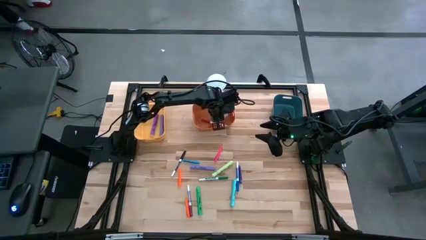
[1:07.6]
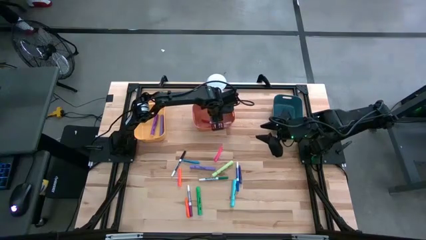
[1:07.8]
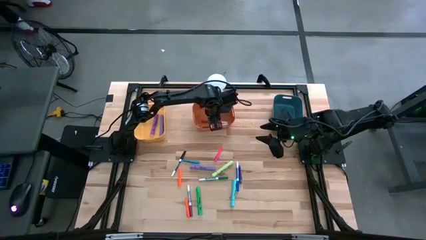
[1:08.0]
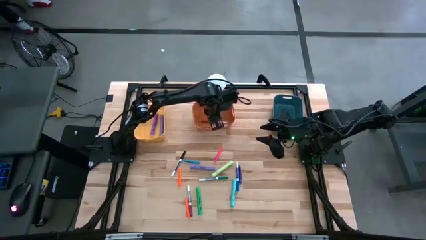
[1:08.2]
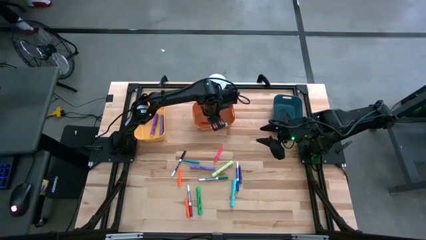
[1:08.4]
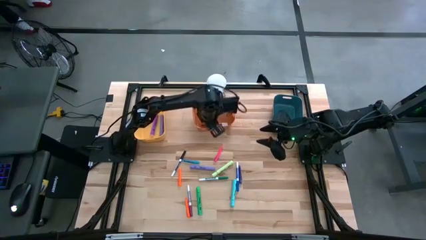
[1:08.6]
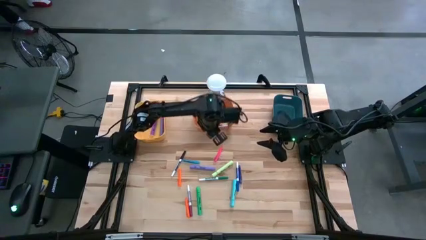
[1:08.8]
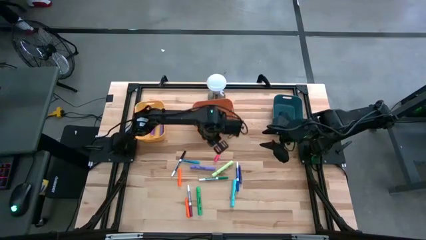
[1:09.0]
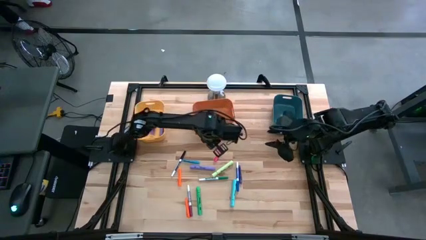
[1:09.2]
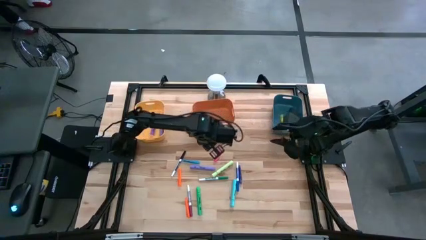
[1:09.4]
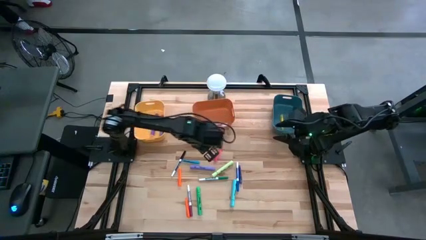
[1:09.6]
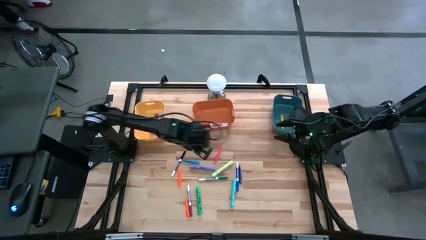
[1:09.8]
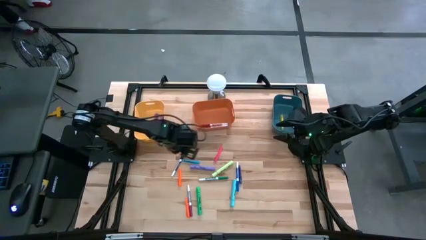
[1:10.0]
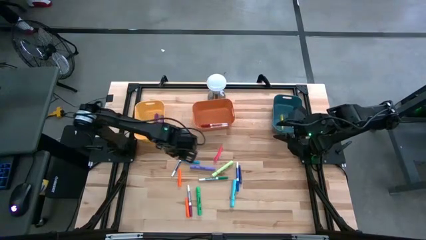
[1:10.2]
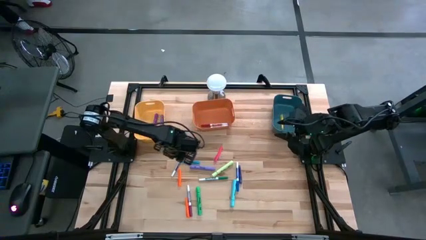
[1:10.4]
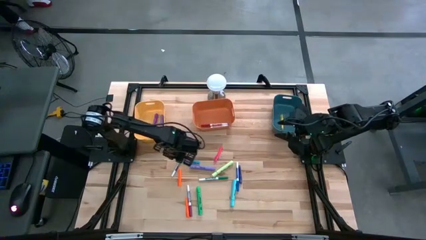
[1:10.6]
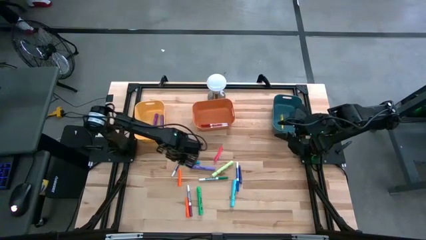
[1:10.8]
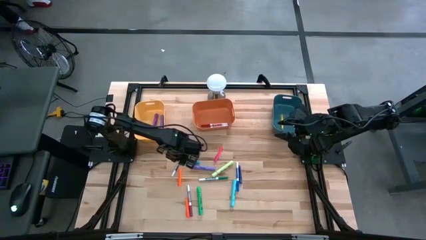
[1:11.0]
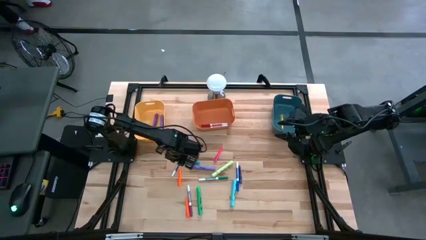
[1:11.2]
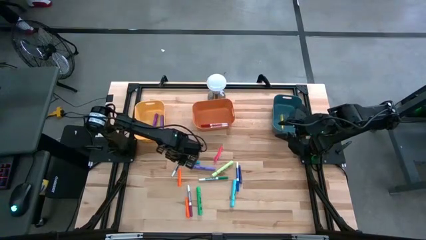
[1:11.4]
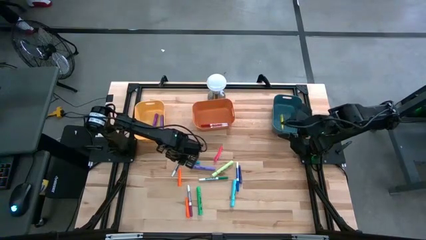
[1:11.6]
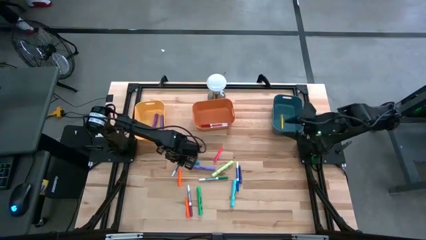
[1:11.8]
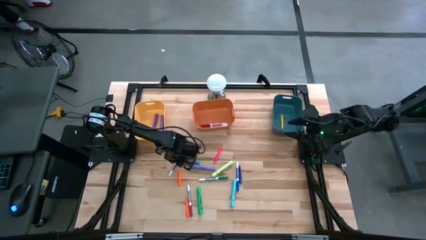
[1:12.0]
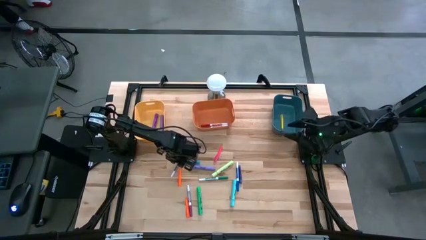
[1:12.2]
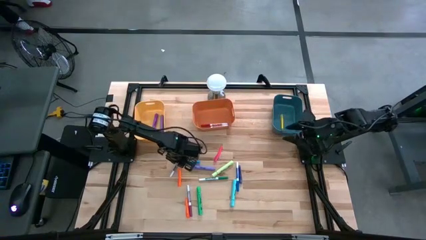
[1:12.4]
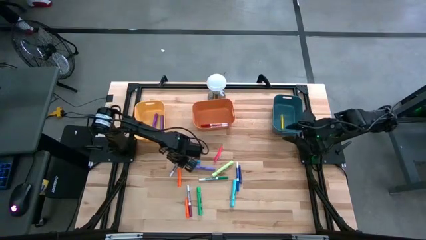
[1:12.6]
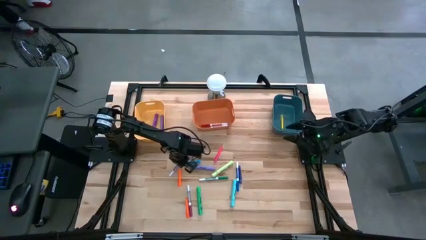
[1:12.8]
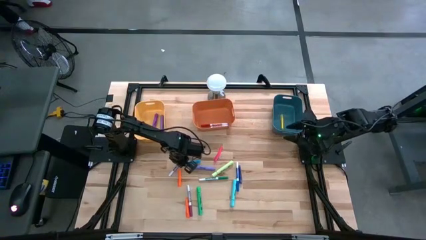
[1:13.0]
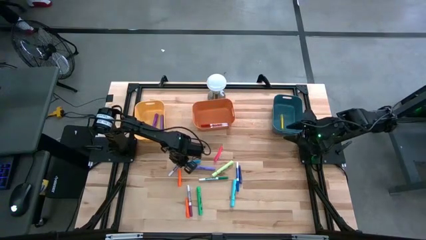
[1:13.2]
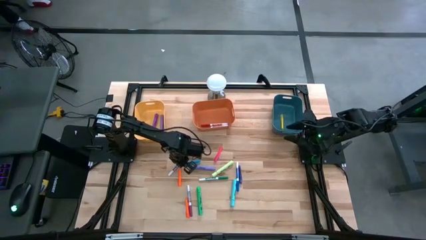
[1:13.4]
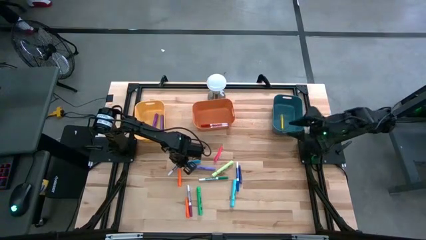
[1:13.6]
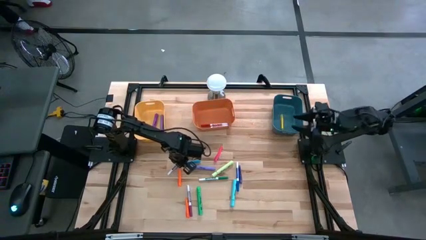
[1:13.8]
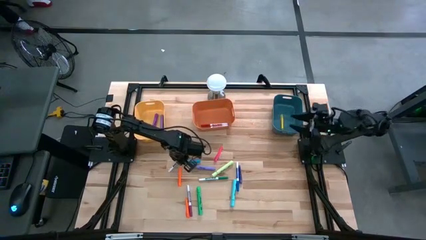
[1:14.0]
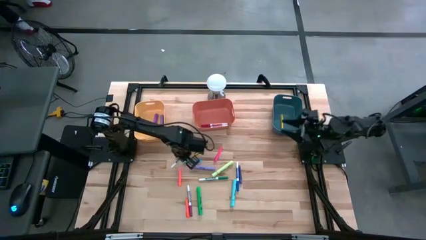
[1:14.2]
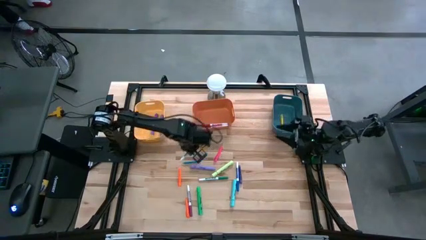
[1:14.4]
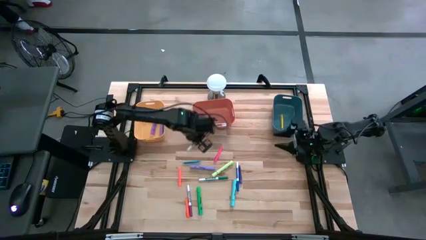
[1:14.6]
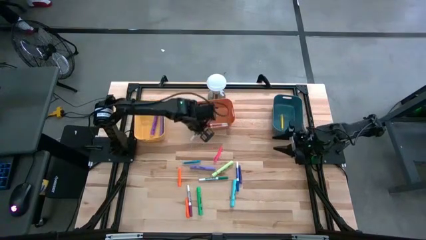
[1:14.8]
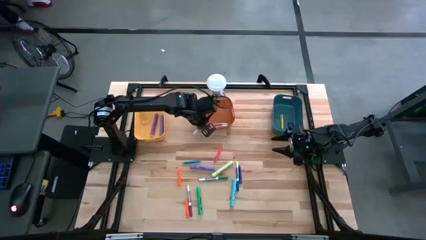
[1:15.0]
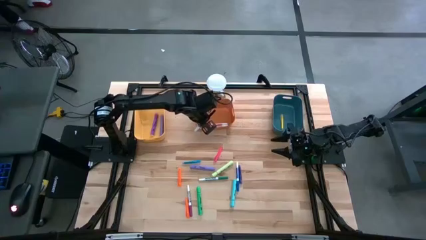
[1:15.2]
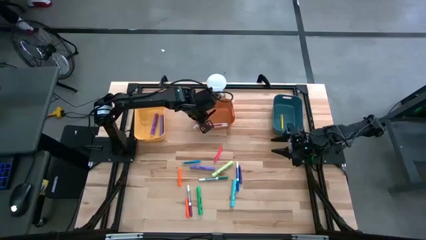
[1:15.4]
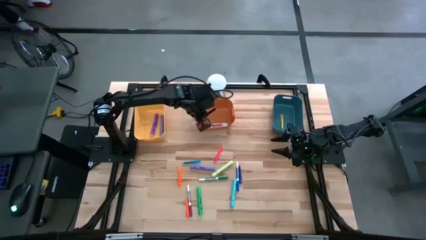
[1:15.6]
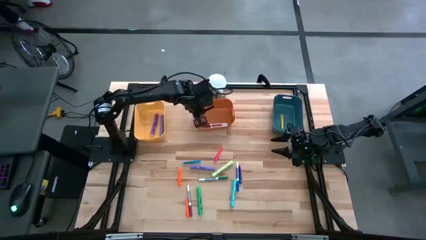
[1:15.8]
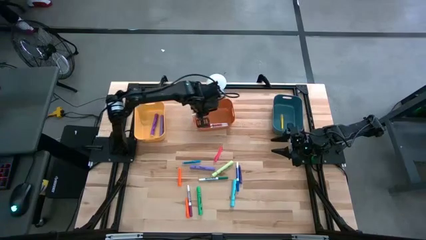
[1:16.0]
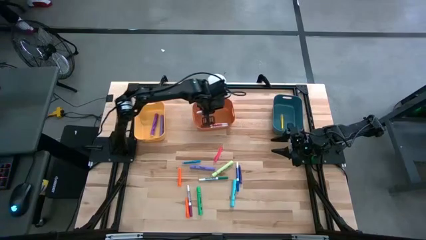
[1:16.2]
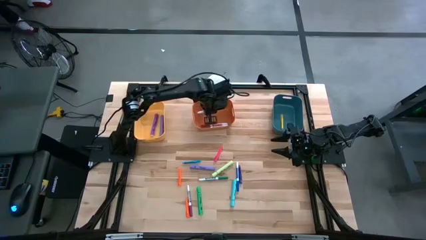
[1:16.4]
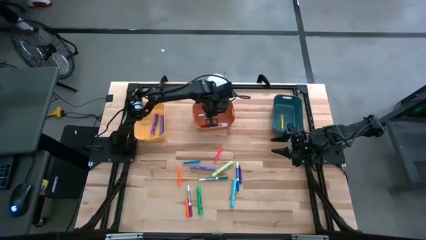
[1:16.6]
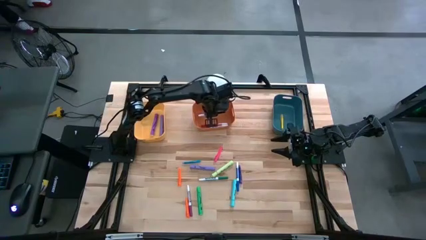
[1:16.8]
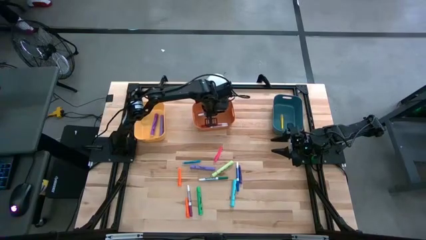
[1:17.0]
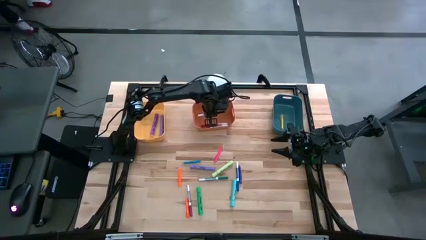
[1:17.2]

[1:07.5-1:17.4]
Task: Pick & Place Markers
Put the black marker pen into the orange bin
